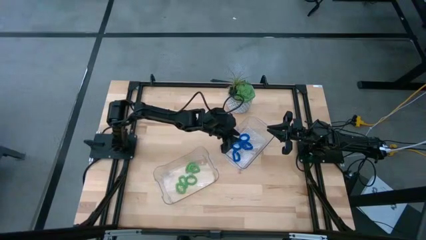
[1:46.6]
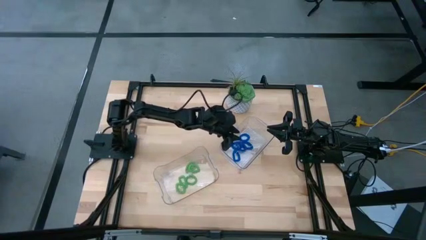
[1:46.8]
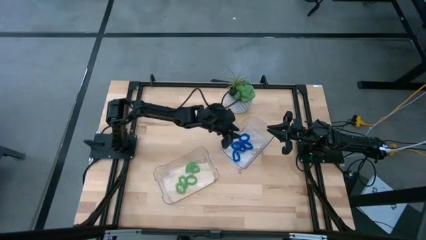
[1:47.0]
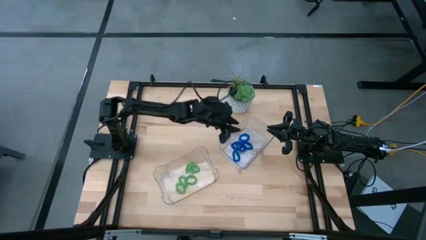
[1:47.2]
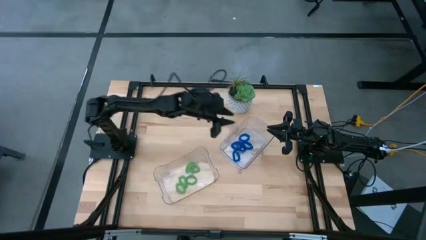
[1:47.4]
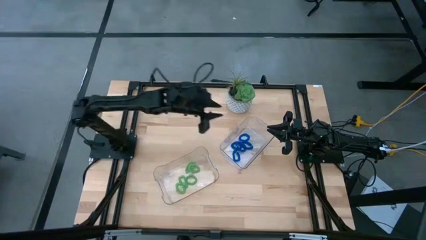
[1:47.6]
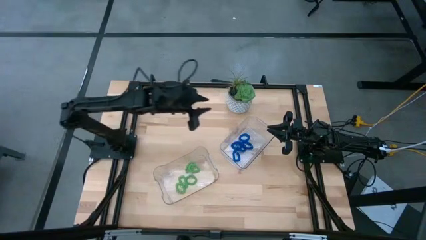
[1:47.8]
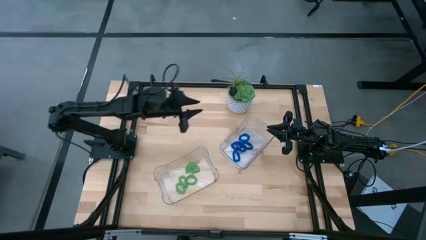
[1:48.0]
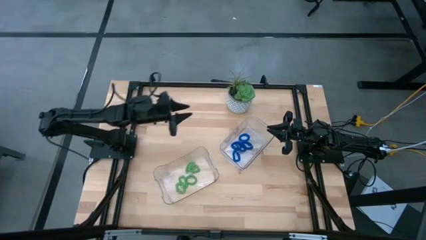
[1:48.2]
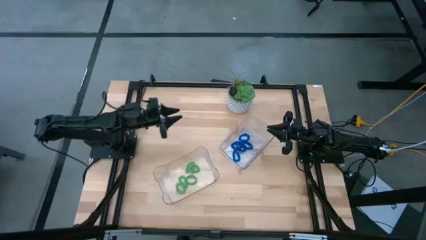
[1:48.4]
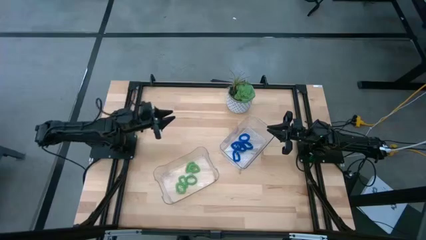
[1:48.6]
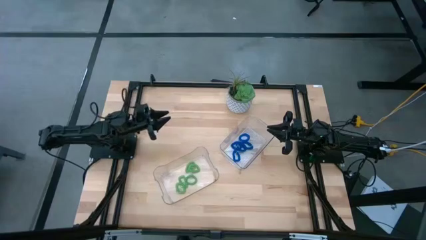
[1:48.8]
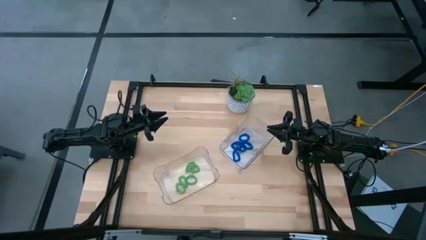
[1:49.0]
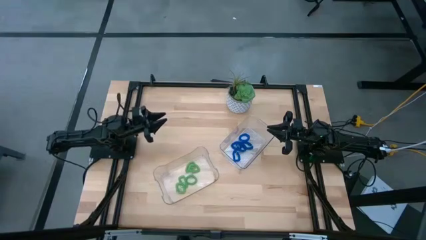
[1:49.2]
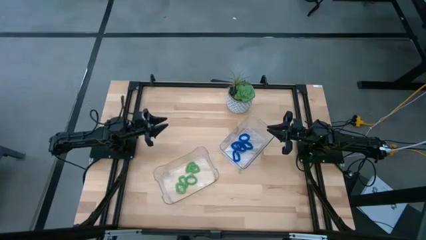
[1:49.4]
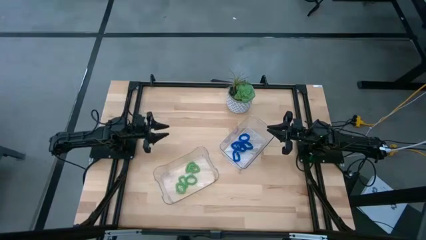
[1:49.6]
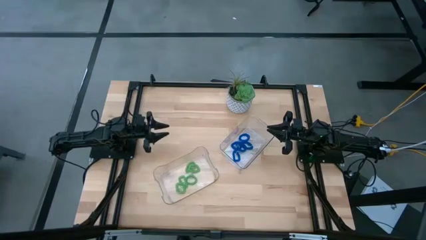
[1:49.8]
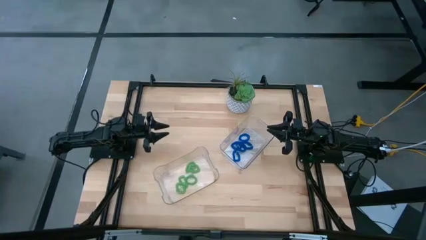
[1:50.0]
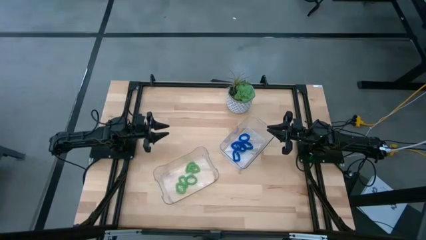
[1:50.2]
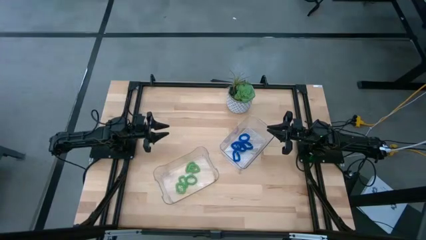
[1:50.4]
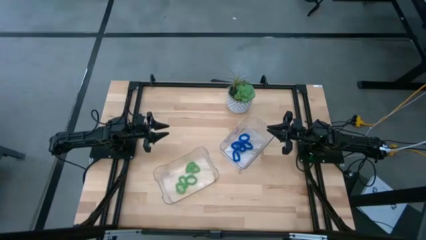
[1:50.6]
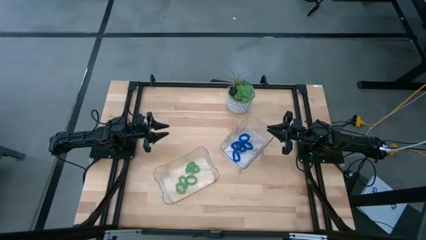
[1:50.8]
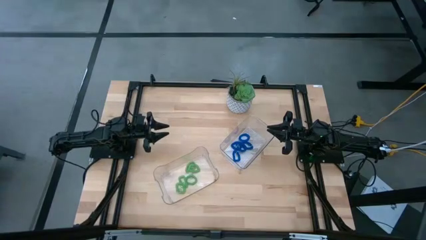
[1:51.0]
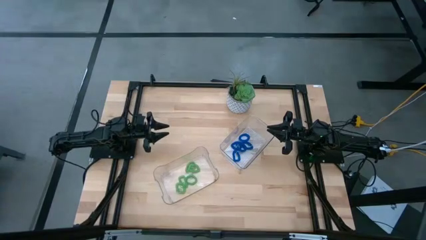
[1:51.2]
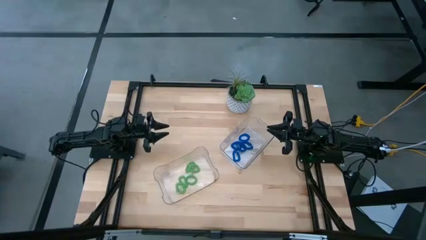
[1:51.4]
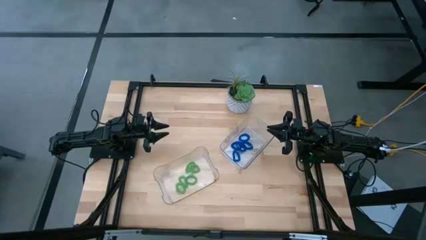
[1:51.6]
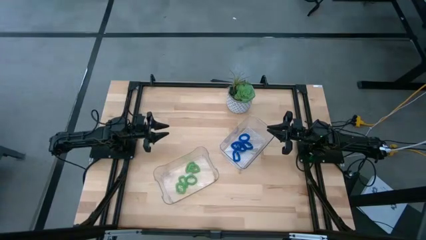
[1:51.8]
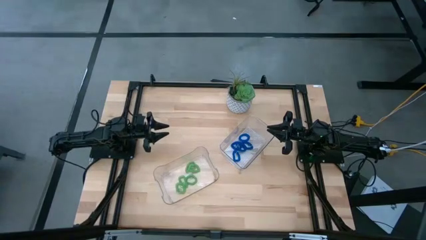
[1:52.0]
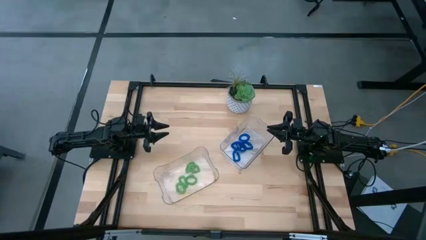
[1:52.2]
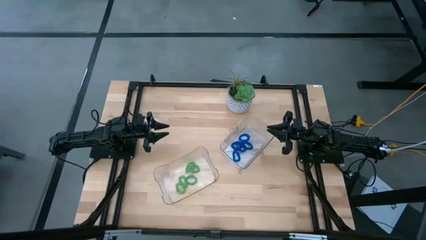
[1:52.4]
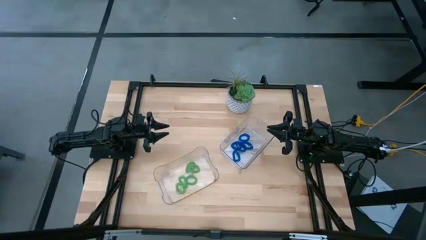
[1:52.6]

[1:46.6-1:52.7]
Task: Sort spring keychains
Return to Home Position

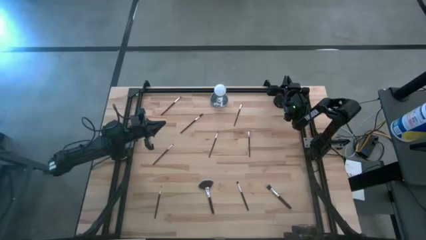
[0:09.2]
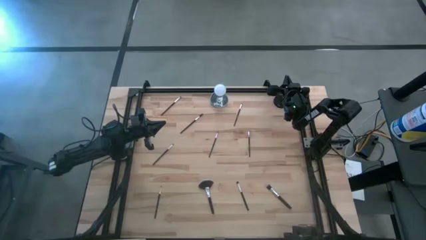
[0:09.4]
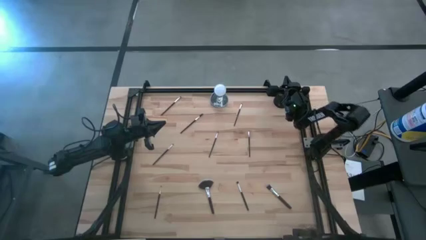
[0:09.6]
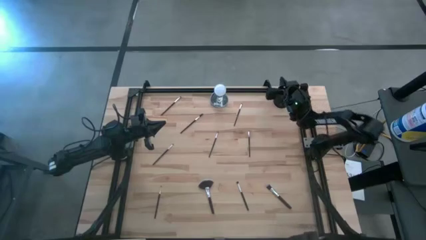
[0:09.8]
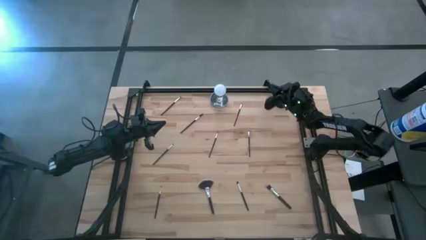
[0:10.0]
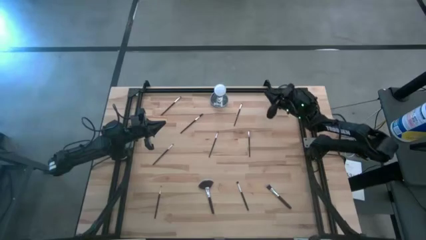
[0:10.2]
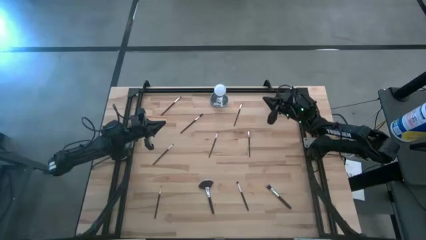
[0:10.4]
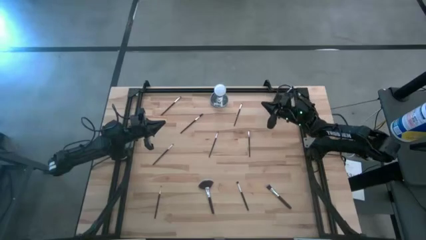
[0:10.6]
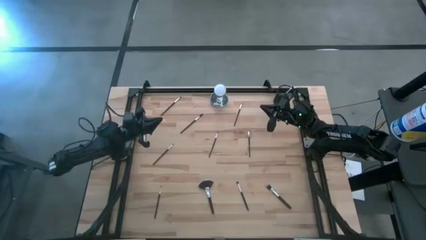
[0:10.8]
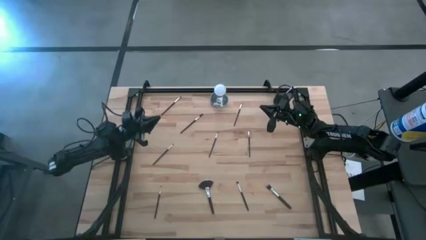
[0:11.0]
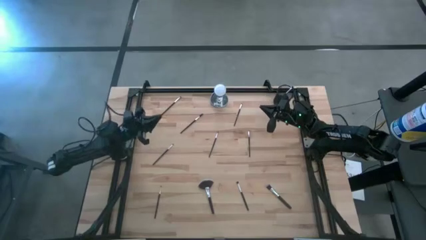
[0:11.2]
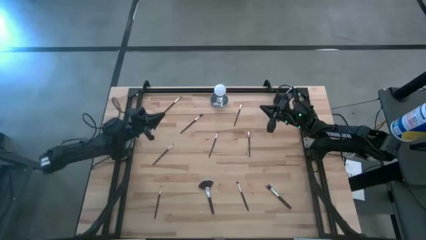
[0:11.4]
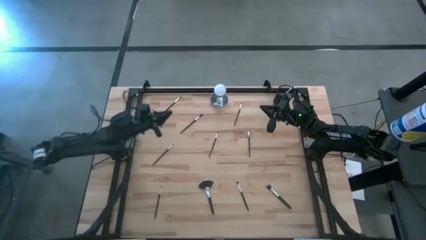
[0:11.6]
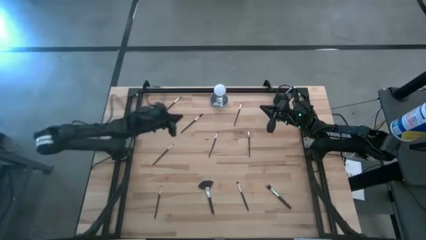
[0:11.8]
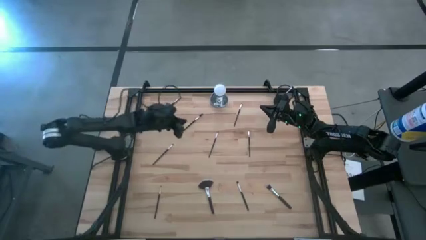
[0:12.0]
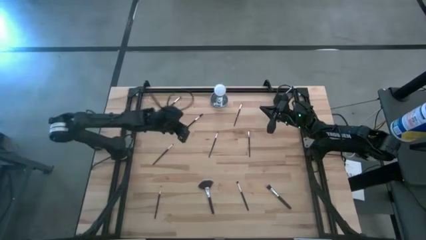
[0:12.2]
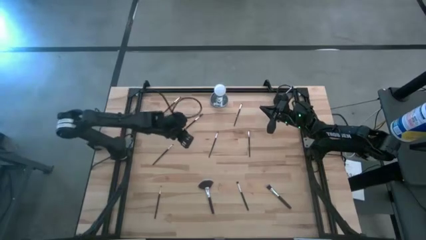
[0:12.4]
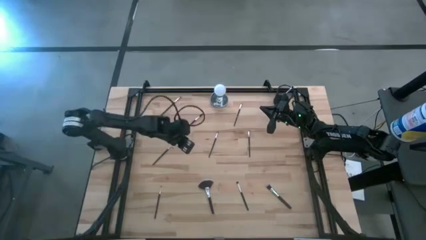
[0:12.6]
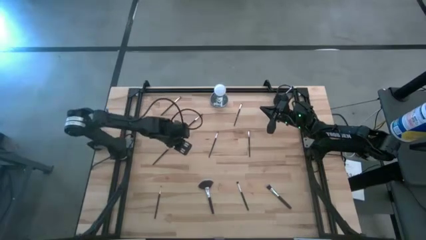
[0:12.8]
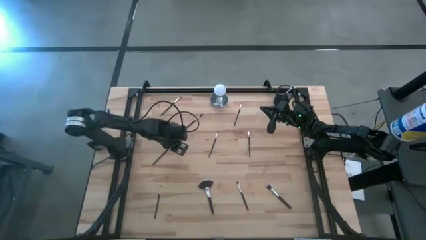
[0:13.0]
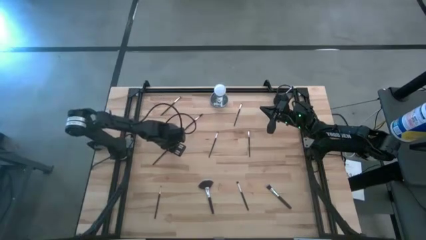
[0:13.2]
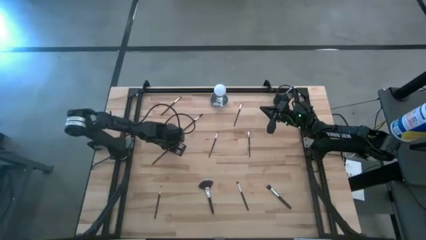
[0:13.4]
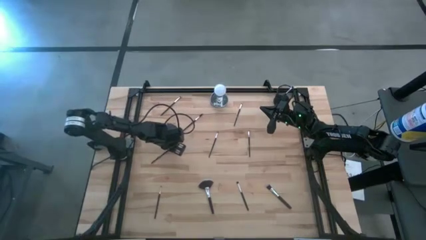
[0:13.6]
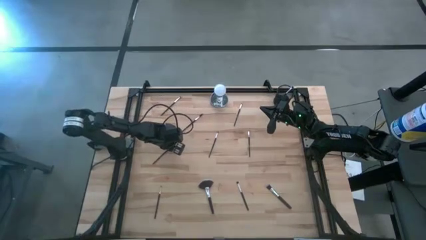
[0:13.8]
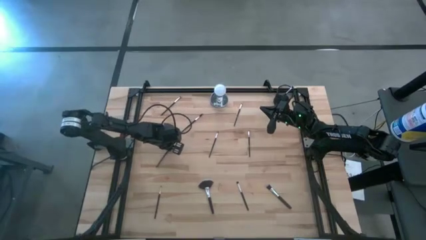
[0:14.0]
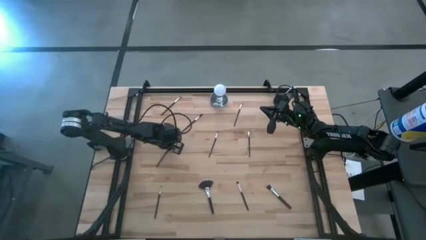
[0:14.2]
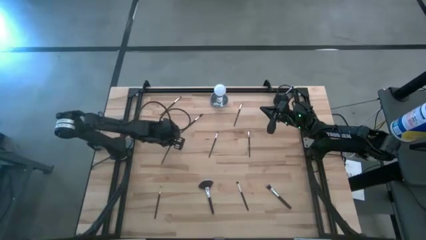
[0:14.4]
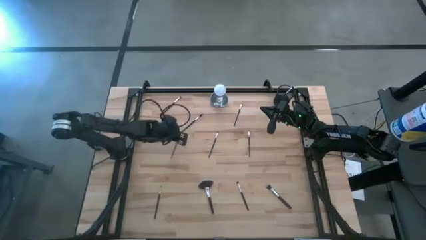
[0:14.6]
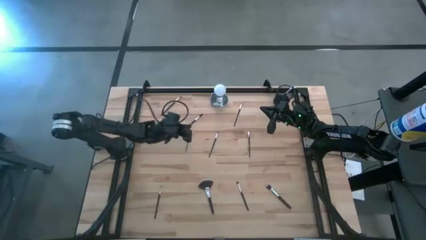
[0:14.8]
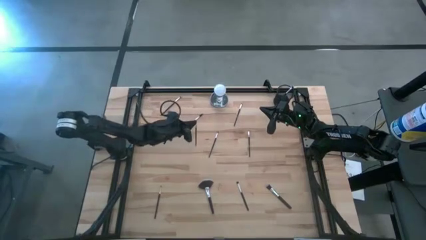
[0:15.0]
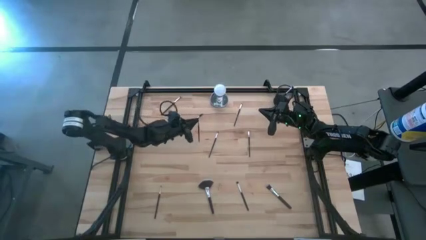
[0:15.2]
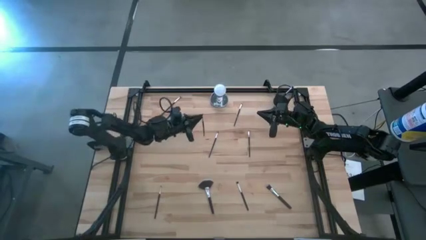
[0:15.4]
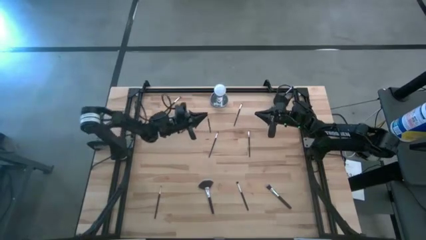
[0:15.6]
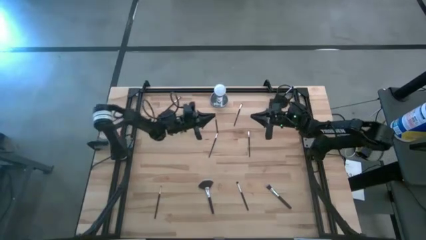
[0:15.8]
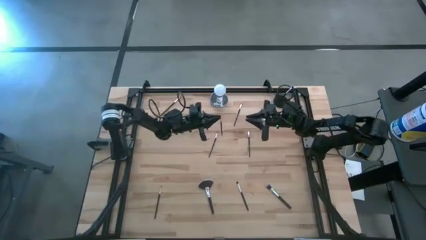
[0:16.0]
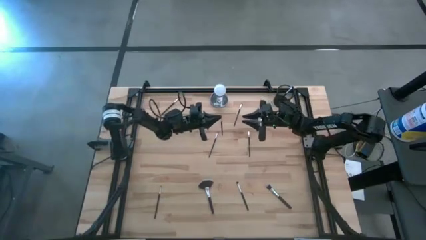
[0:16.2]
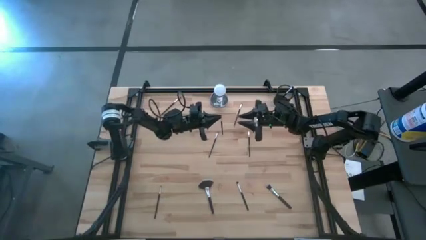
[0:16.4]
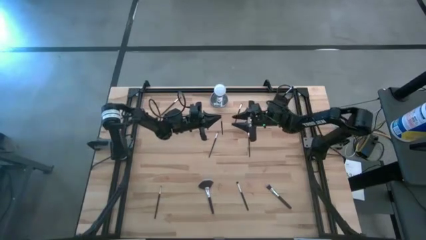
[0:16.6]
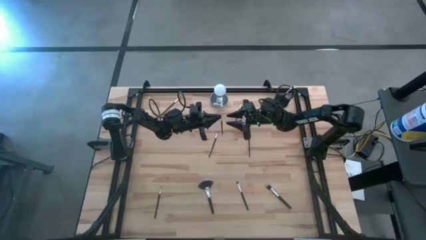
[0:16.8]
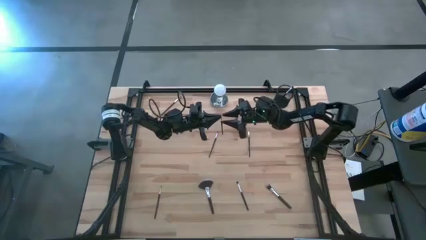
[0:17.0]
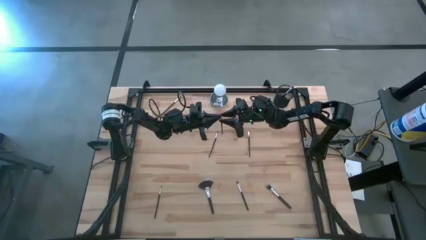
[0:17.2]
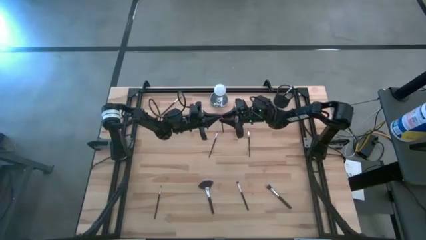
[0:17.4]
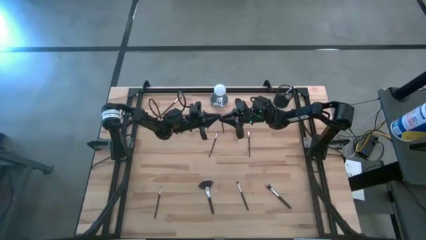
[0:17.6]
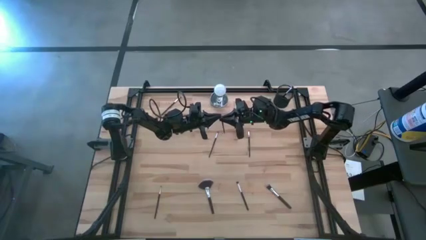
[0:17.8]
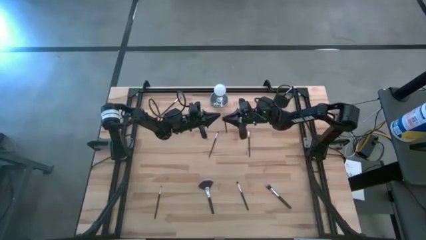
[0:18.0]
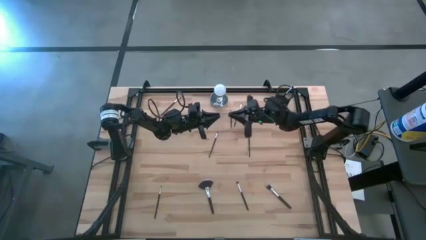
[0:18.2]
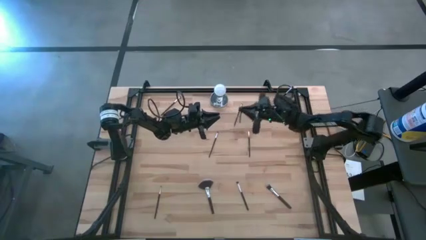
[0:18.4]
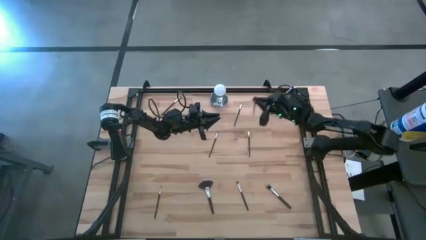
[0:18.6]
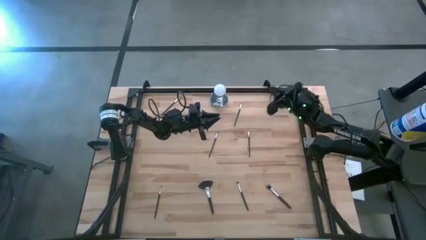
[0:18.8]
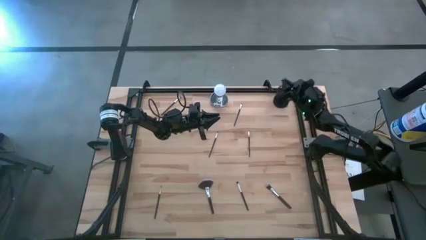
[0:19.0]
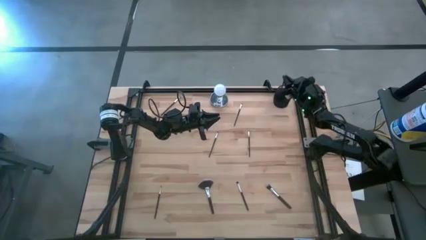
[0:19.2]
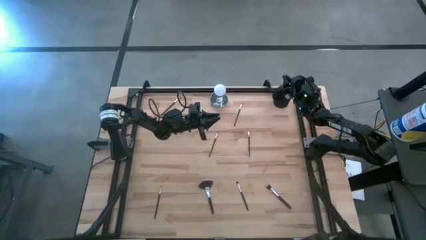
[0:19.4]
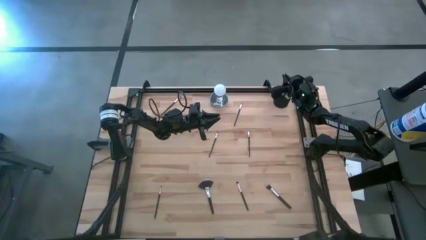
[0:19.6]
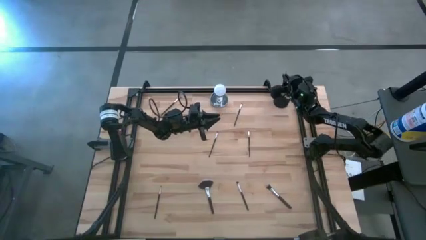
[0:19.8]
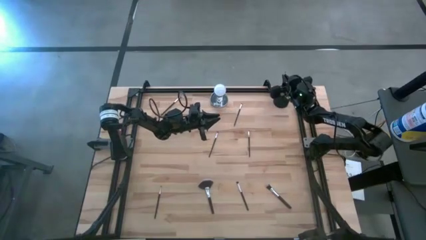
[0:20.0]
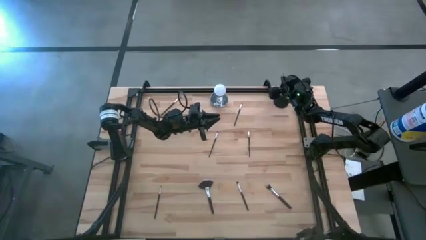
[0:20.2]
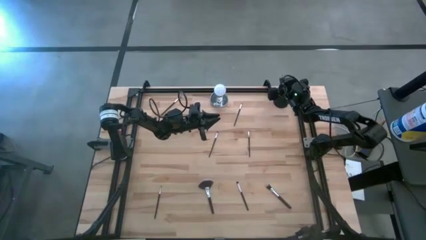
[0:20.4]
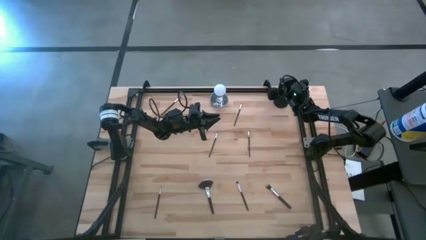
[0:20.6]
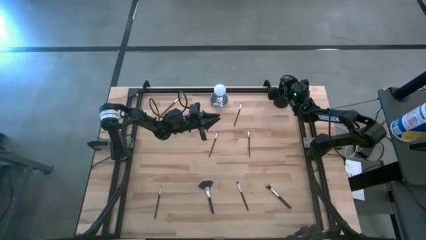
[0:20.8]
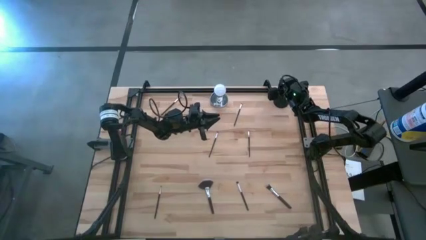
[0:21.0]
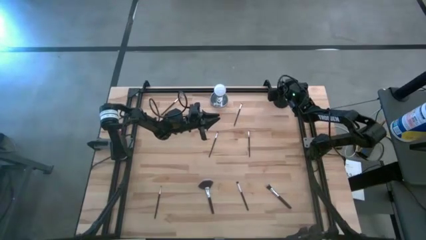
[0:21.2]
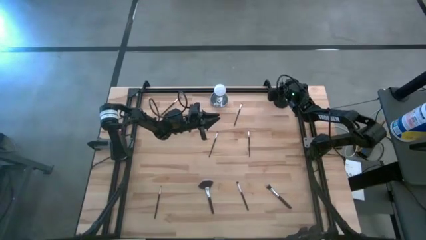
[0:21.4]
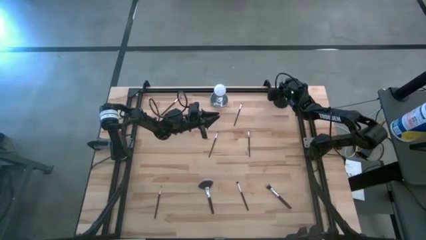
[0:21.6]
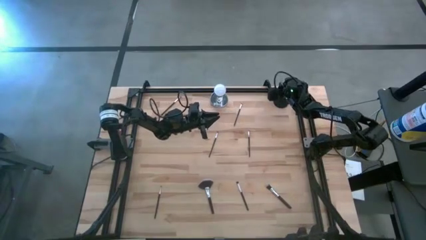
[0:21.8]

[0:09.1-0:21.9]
Task: Pick & Place Makeup Supplies
Put the makeup brush into the makeup holder
